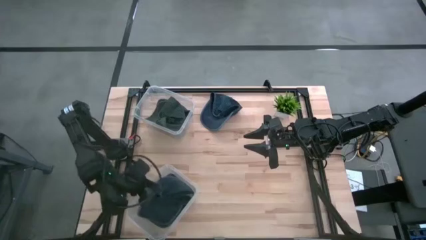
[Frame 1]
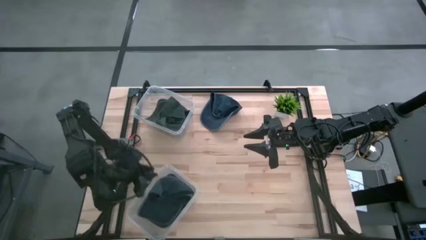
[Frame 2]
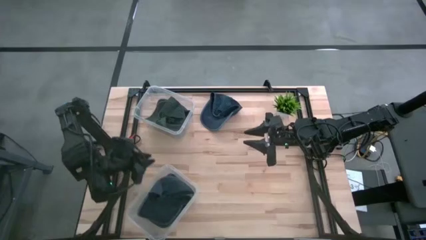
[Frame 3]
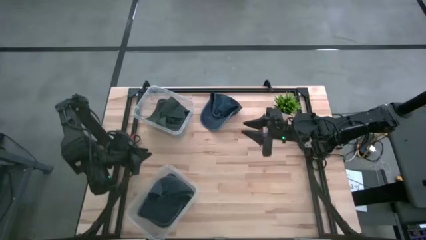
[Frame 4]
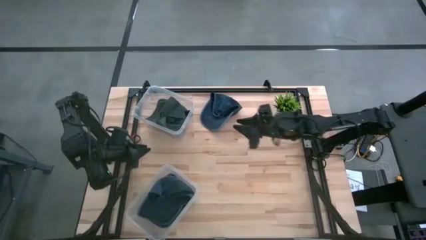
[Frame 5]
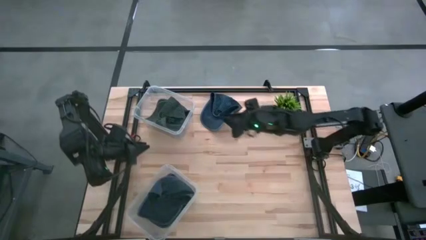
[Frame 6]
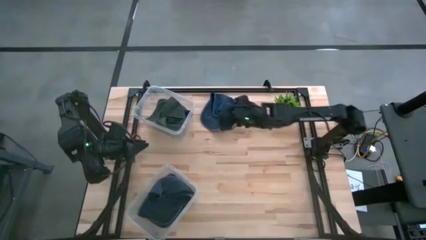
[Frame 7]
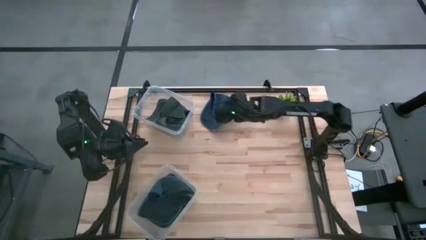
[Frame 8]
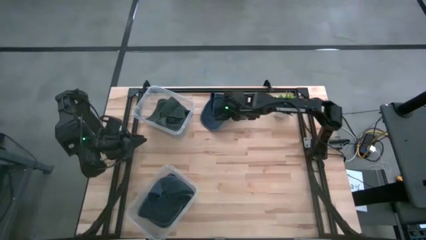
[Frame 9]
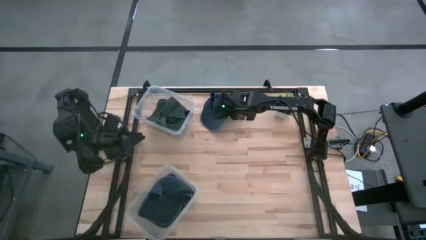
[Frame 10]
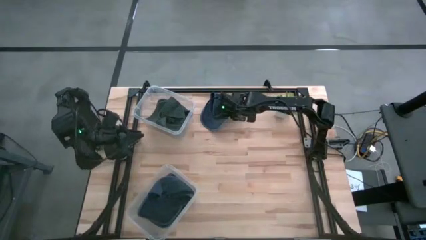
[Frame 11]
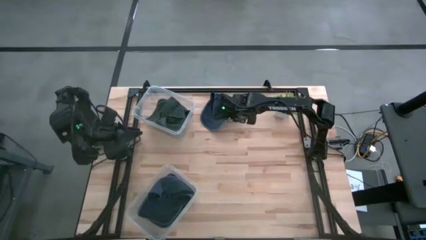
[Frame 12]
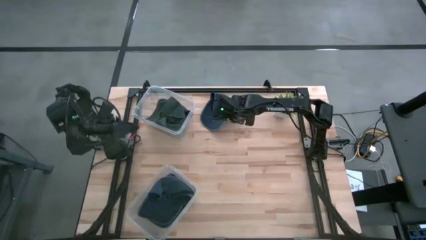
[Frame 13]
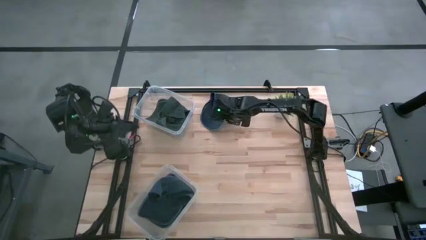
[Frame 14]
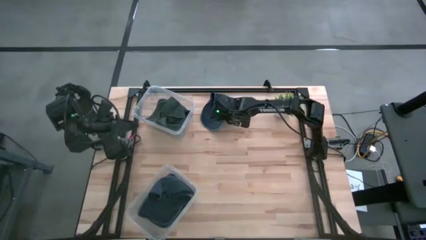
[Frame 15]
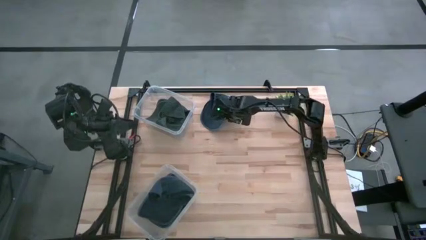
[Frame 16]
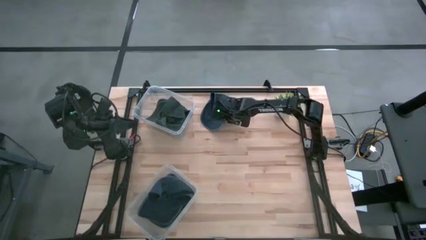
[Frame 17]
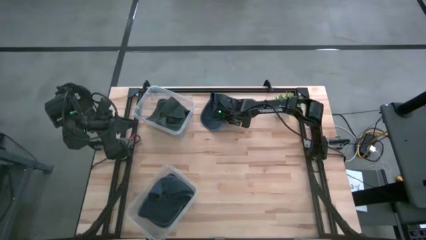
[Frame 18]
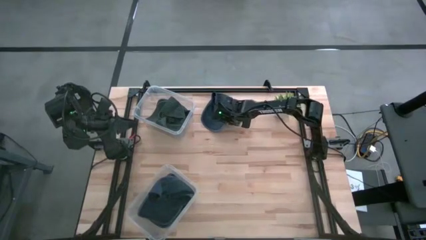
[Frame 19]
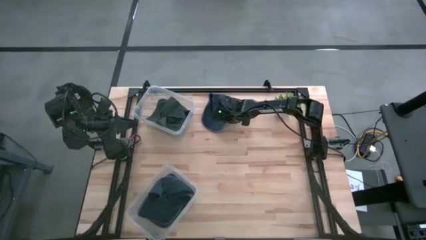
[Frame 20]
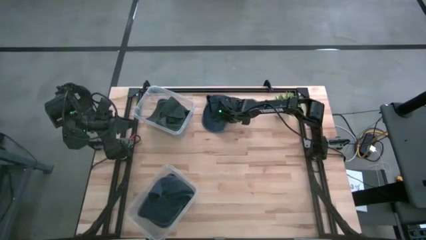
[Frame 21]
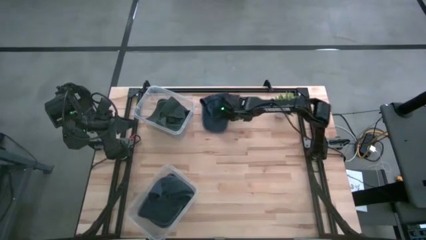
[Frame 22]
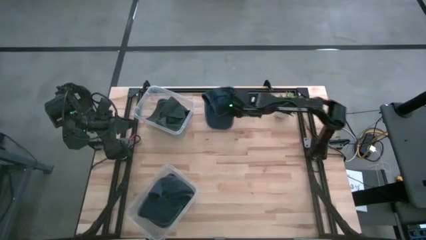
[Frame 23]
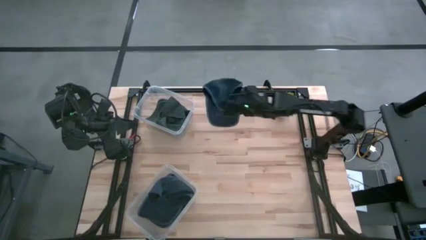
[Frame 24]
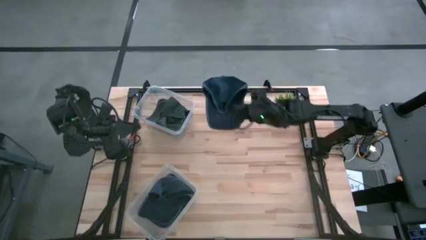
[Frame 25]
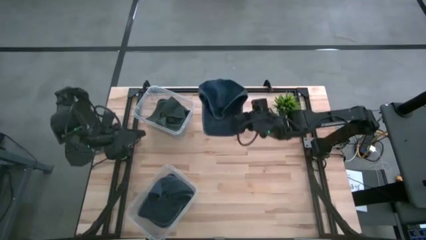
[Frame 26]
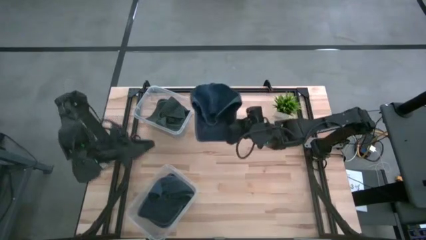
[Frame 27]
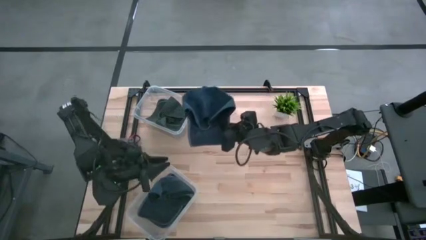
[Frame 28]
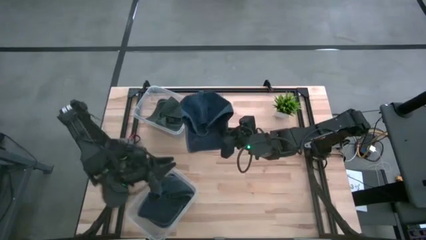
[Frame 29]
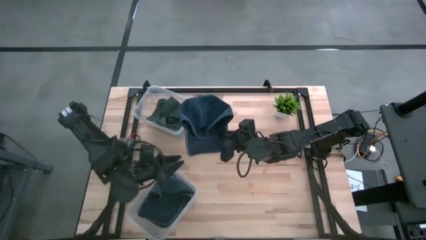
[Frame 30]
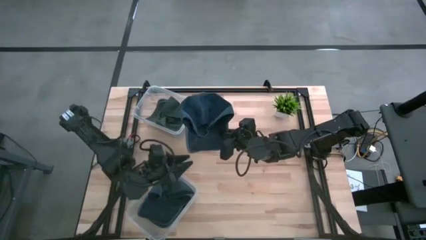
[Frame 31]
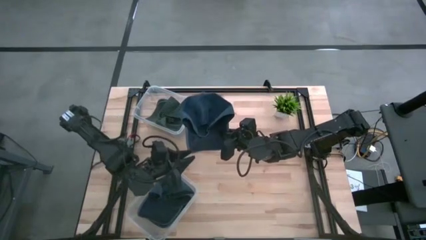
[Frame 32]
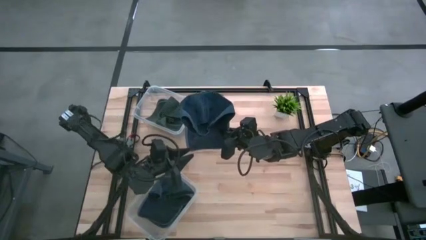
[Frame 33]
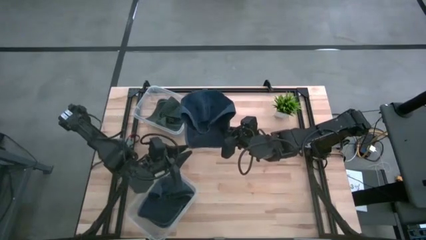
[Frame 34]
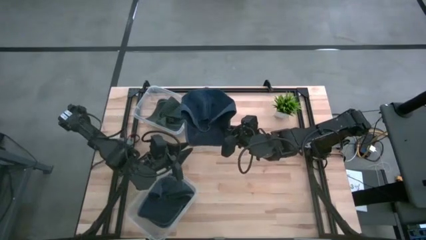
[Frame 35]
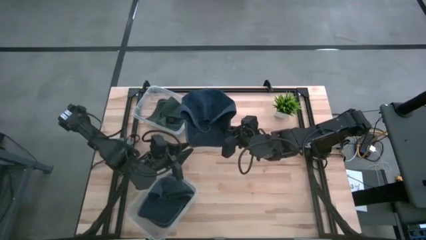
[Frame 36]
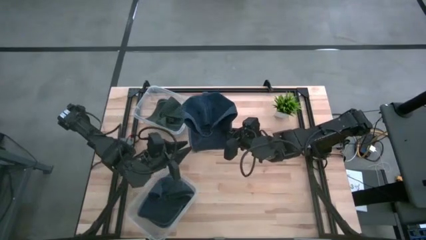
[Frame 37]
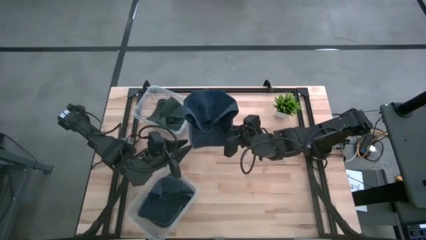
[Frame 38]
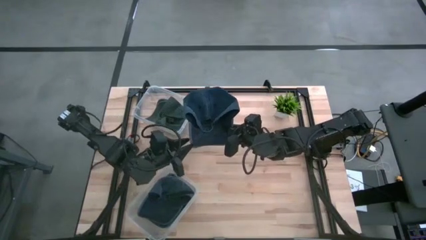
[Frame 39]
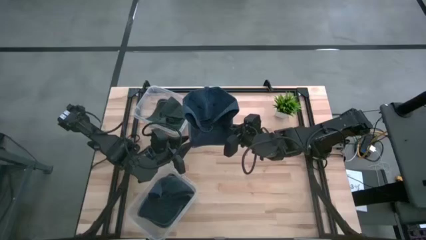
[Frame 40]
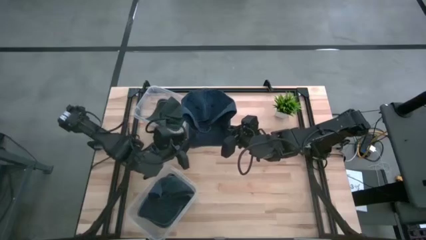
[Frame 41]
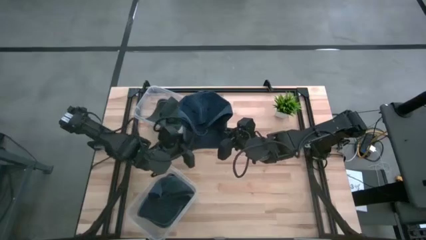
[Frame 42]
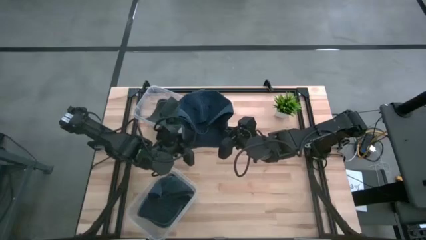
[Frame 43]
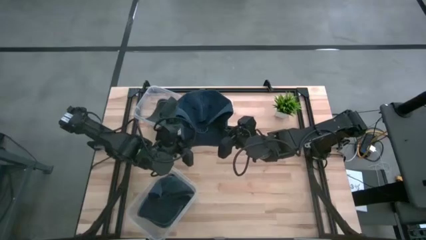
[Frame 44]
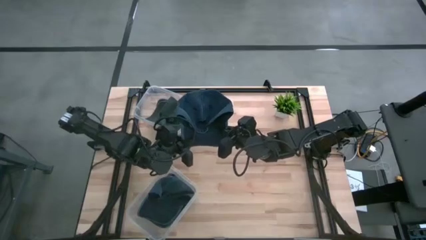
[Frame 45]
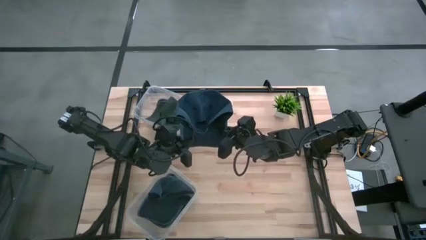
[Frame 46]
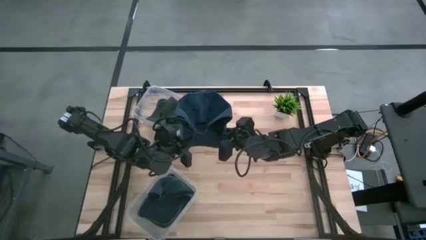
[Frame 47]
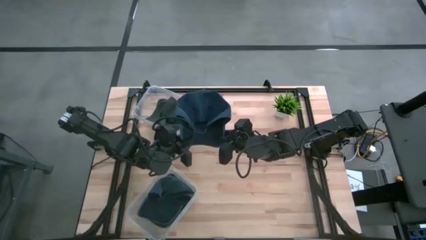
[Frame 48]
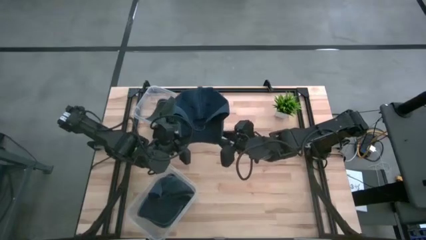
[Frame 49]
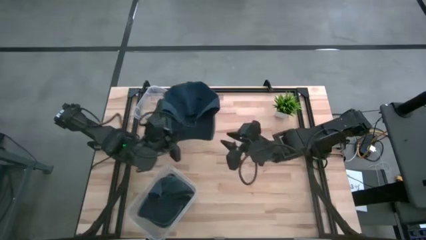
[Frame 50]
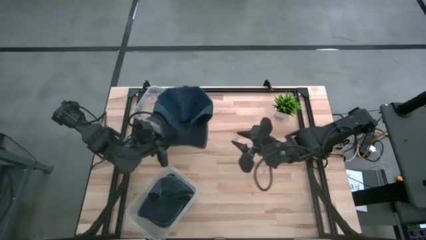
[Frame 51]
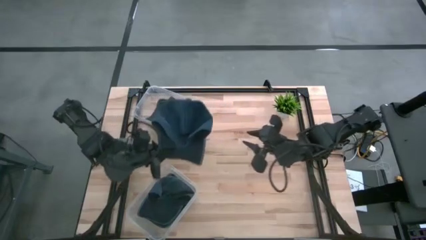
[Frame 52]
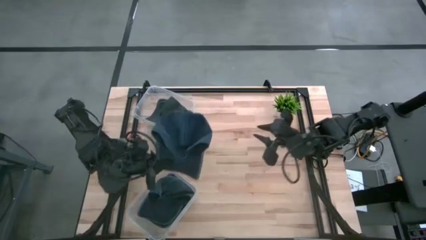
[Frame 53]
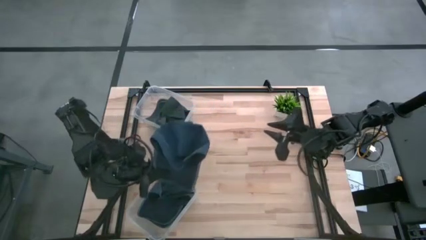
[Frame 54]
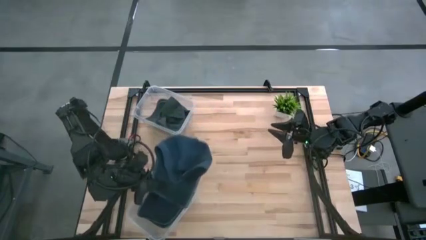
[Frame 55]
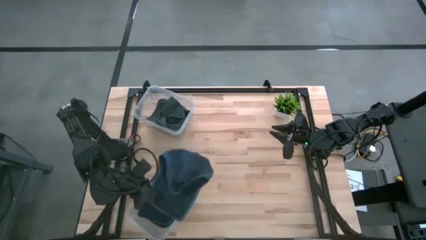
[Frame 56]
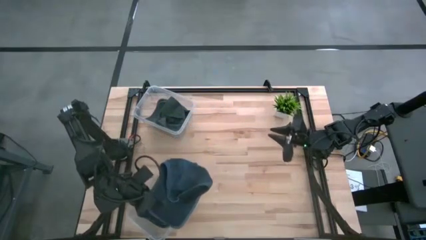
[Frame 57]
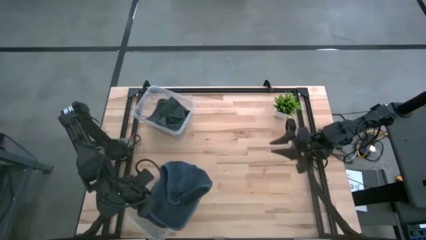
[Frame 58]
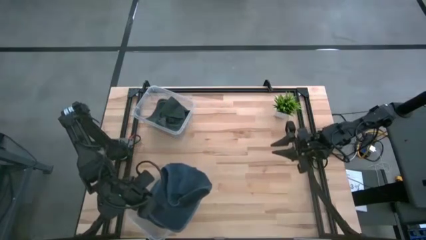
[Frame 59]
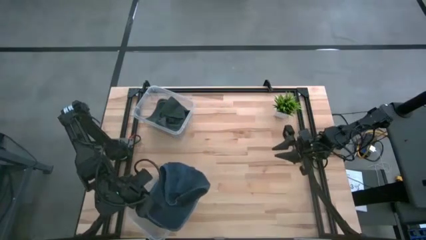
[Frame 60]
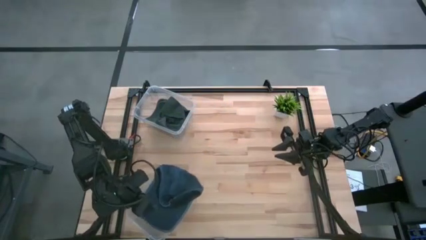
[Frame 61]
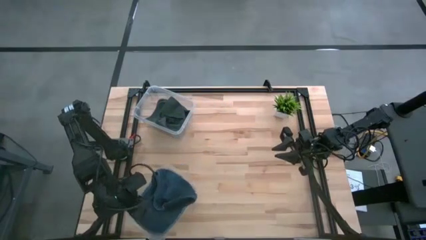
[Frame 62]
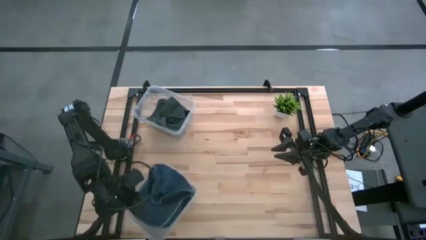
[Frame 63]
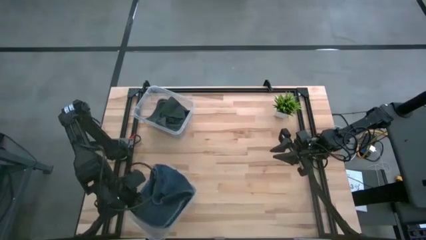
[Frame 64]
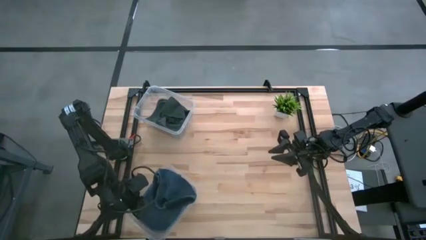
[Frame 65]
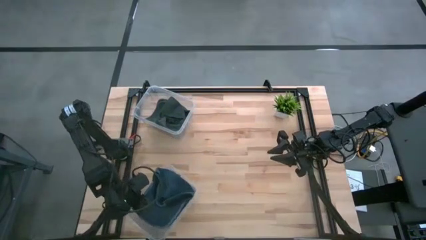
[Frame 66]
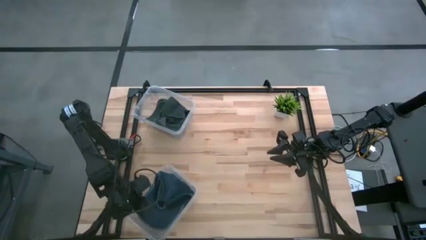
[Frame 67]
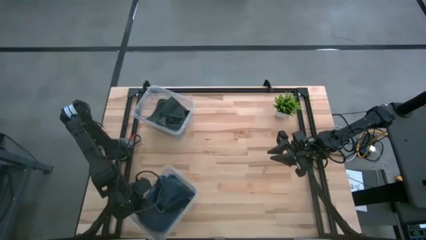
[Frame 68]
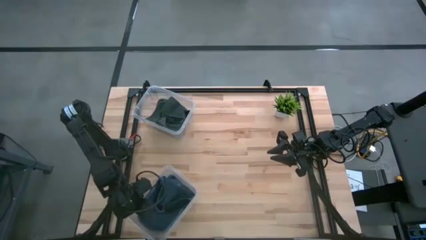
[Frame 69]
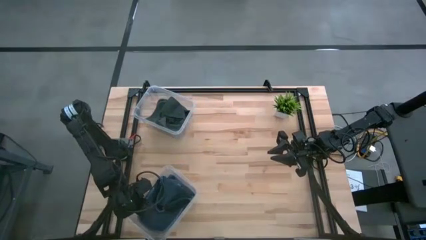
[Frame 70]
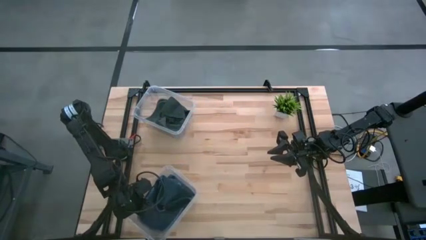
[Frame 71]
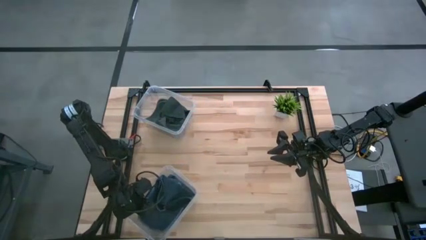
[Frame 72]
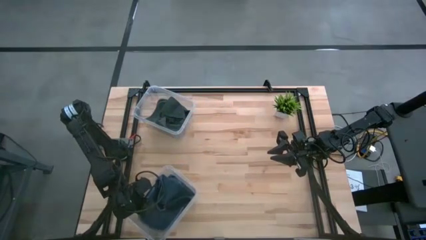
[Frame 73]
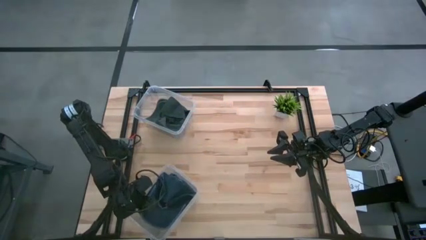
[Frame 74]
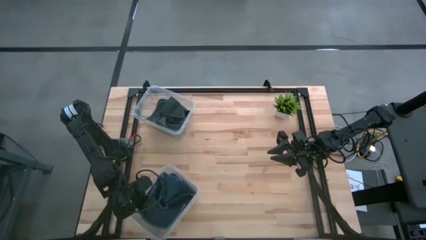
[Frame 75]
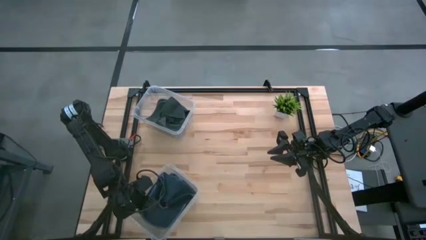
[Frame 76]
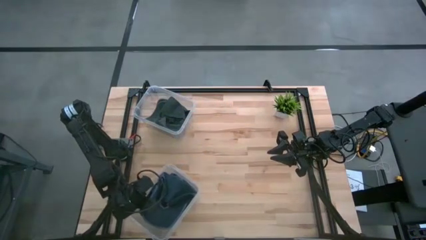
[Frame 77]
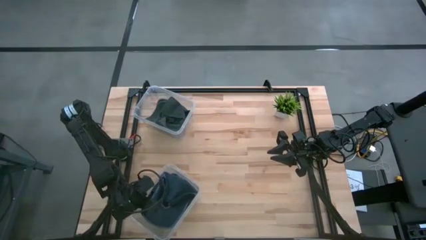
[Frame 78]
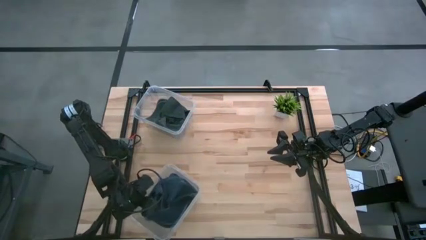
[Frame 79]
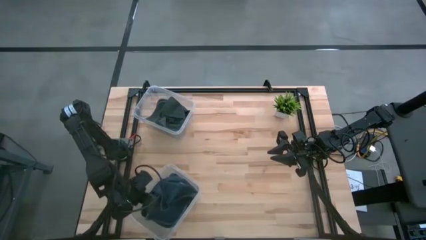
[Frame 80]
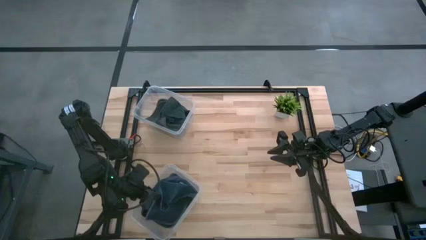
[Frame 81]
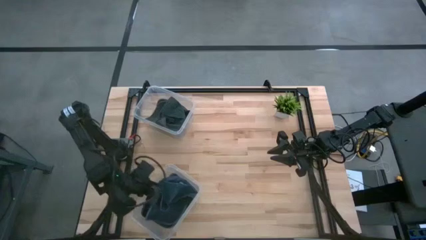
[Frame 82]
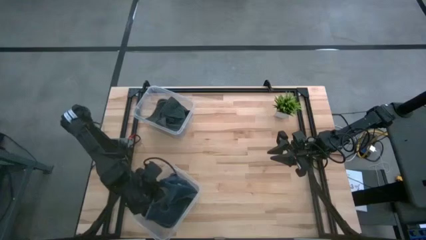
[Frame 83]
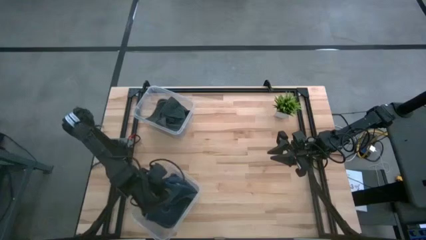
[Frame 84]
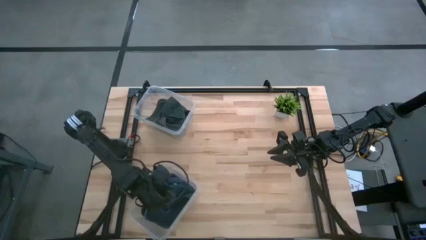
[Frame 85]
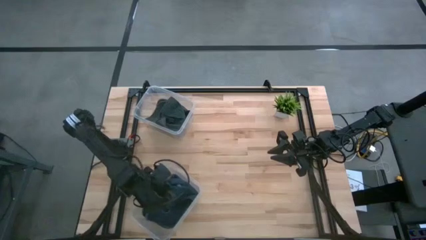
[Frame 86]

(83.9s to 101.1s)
Task: Pick & Place hat
Put the dark blue cap into the bottom transparent bin
